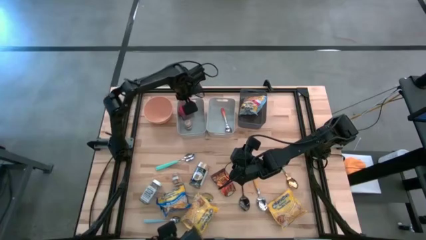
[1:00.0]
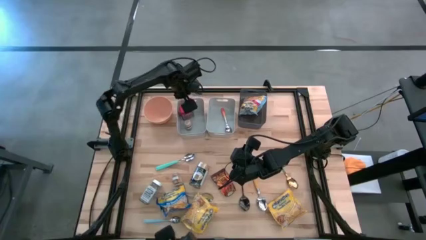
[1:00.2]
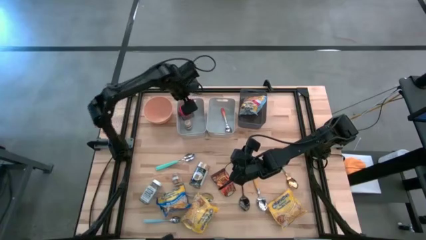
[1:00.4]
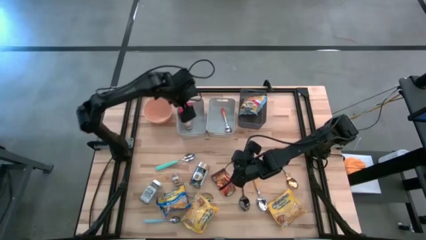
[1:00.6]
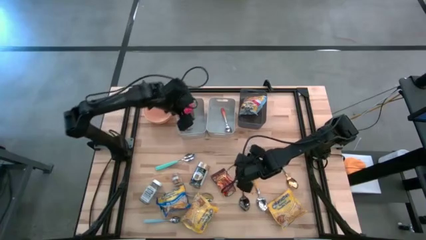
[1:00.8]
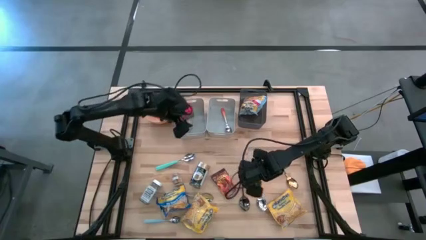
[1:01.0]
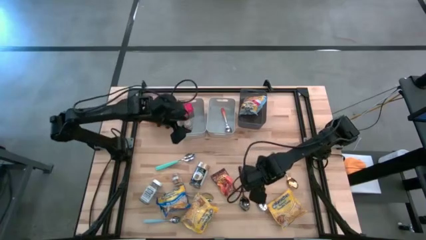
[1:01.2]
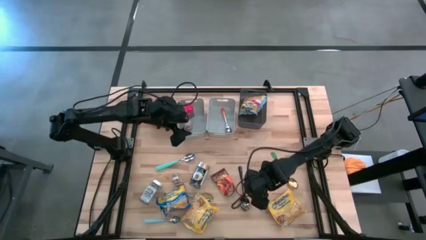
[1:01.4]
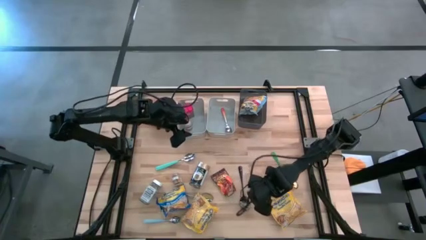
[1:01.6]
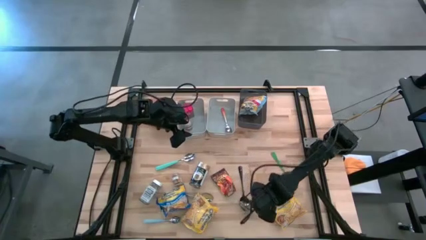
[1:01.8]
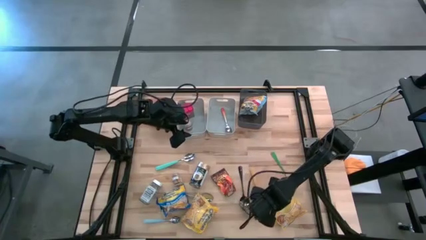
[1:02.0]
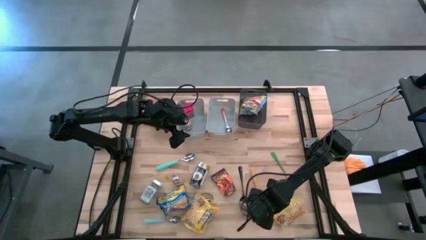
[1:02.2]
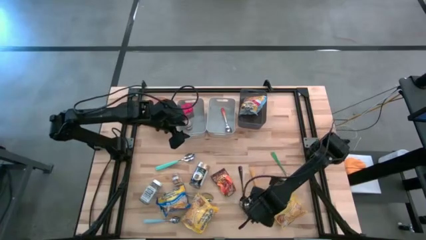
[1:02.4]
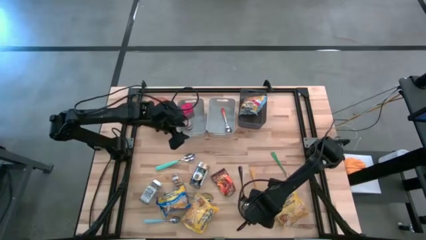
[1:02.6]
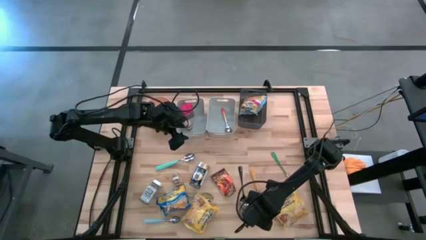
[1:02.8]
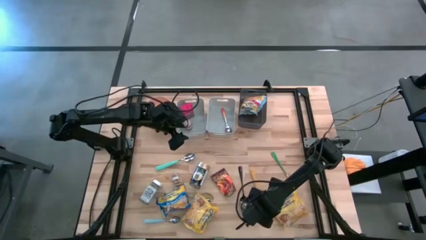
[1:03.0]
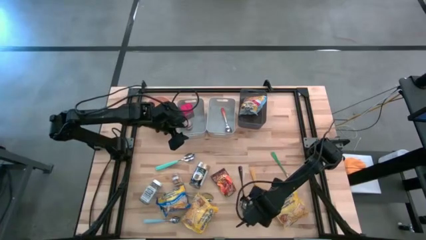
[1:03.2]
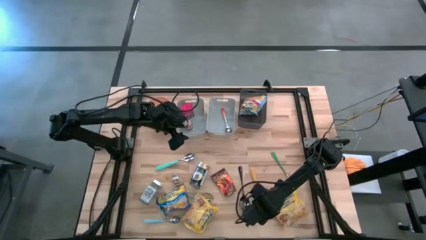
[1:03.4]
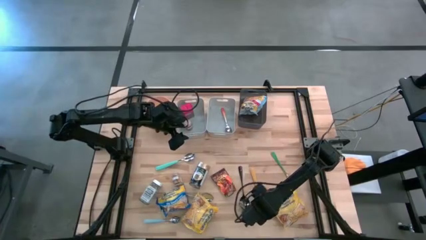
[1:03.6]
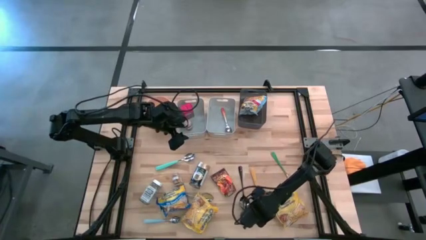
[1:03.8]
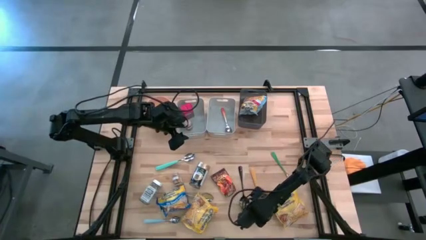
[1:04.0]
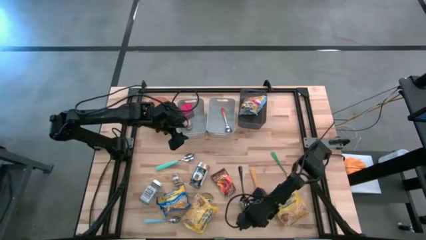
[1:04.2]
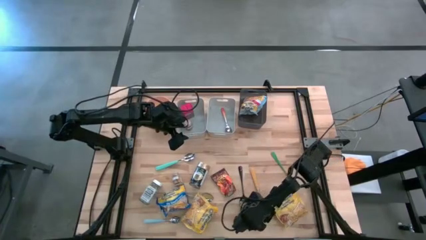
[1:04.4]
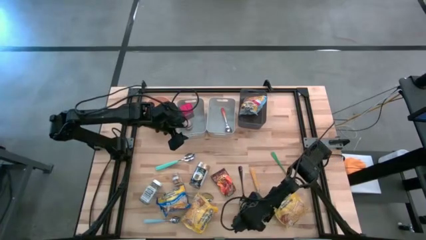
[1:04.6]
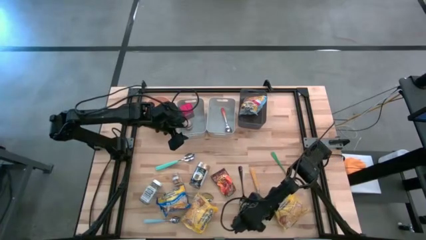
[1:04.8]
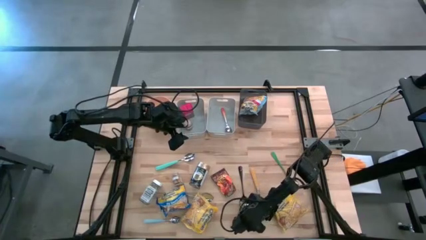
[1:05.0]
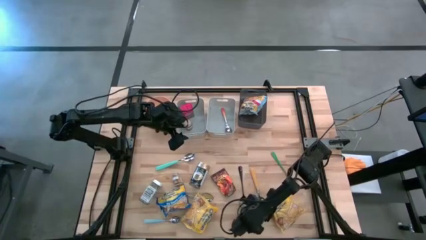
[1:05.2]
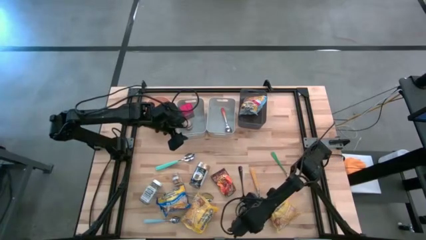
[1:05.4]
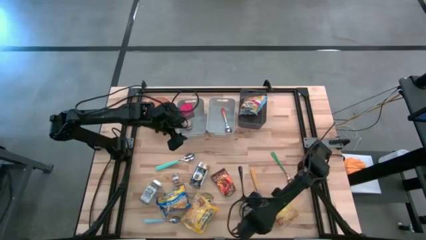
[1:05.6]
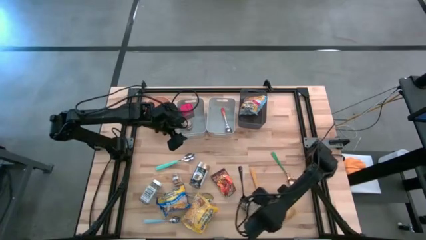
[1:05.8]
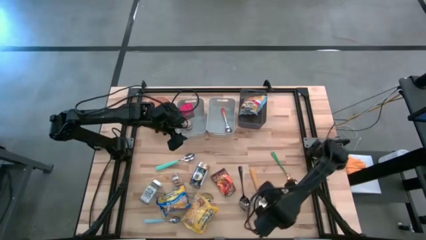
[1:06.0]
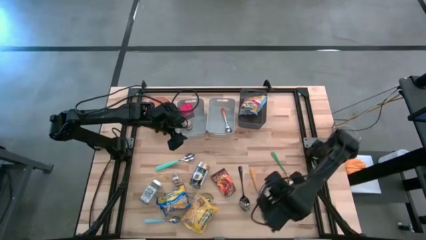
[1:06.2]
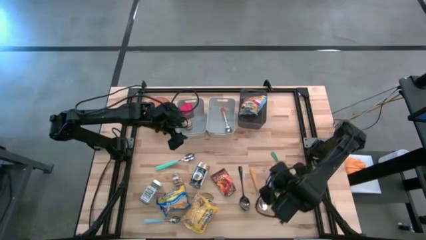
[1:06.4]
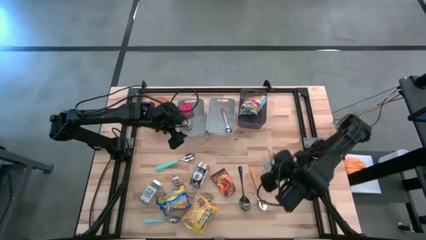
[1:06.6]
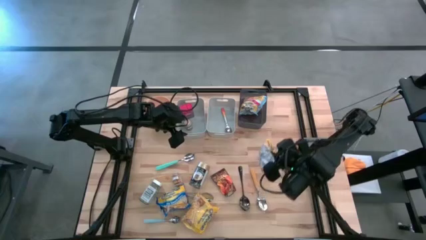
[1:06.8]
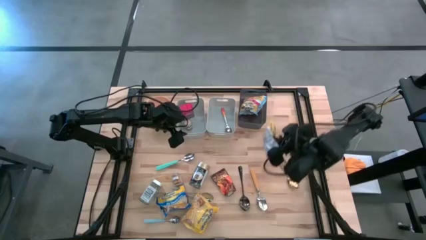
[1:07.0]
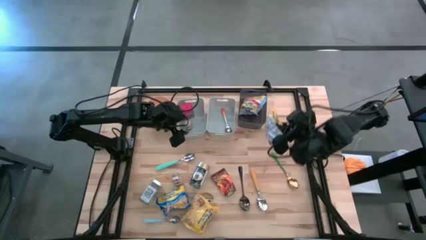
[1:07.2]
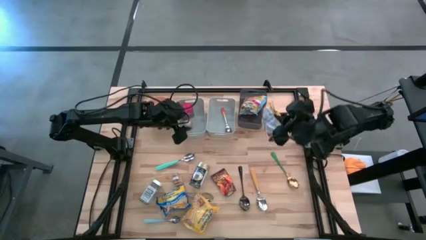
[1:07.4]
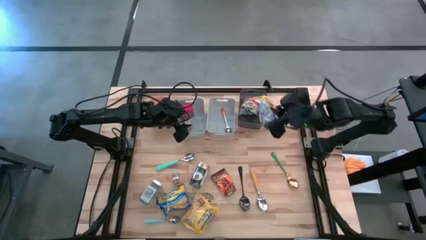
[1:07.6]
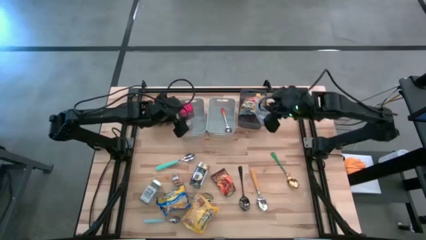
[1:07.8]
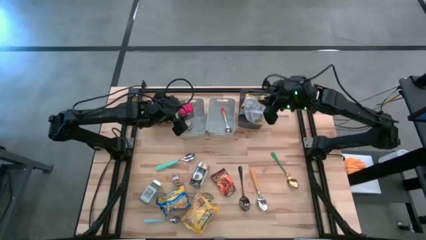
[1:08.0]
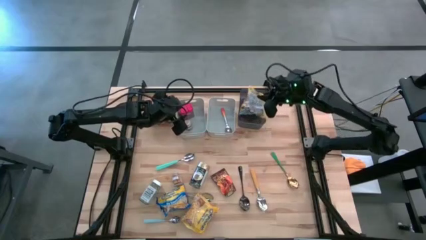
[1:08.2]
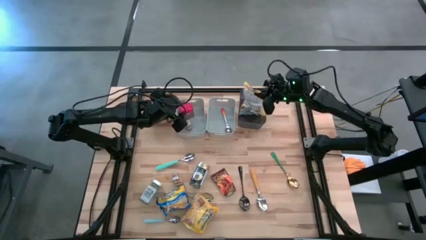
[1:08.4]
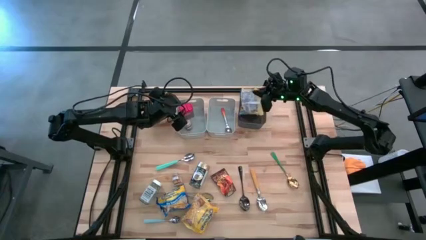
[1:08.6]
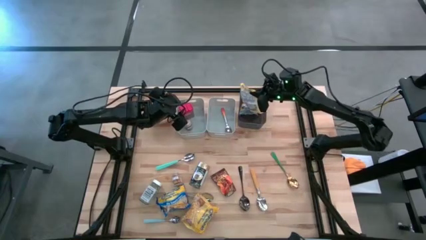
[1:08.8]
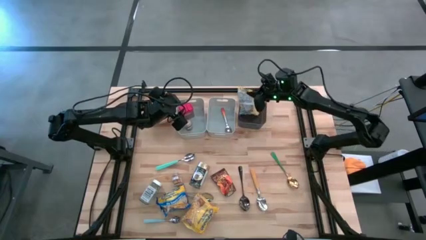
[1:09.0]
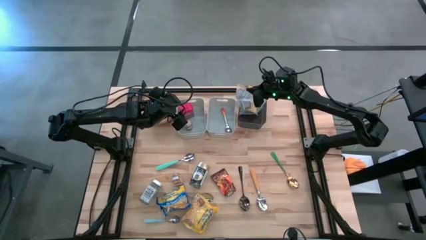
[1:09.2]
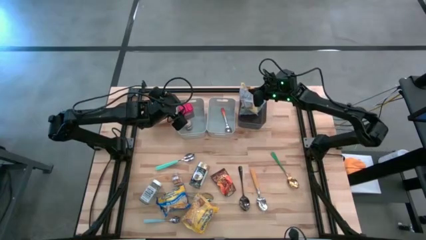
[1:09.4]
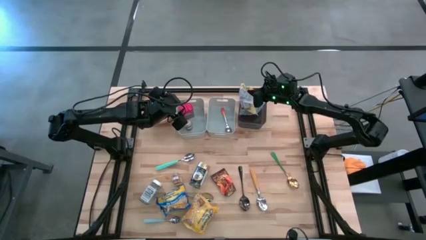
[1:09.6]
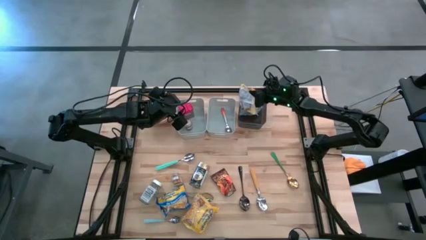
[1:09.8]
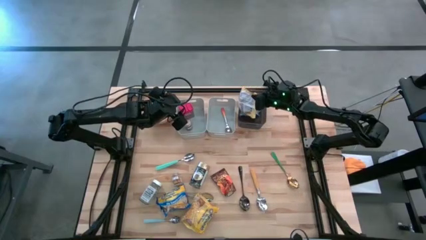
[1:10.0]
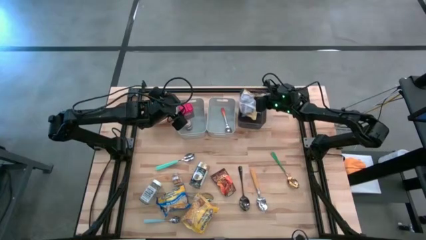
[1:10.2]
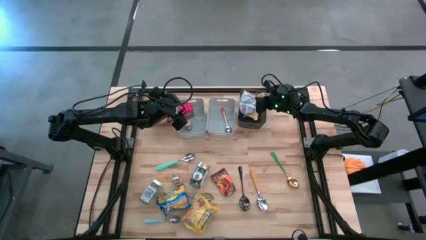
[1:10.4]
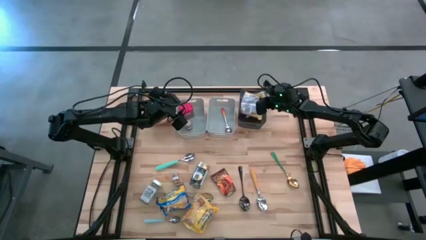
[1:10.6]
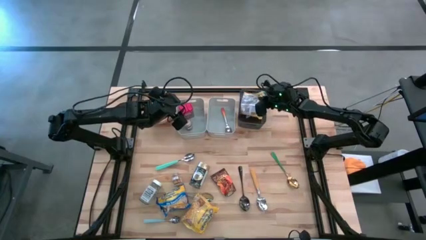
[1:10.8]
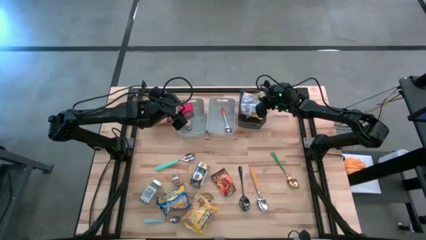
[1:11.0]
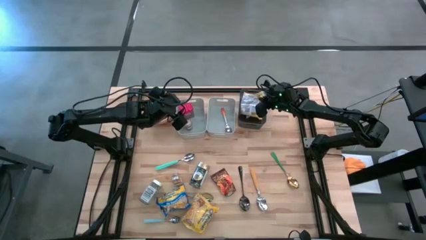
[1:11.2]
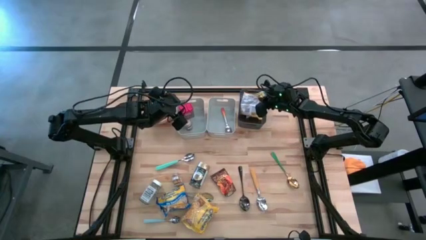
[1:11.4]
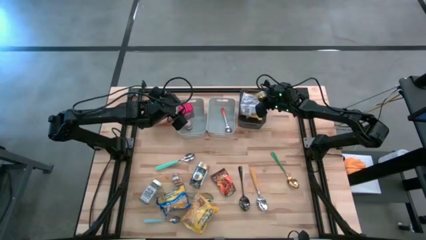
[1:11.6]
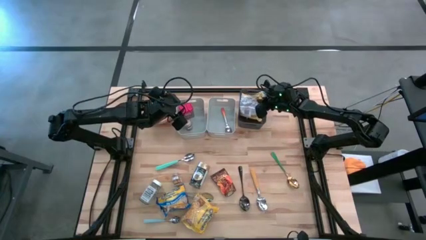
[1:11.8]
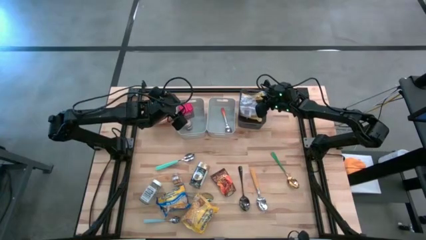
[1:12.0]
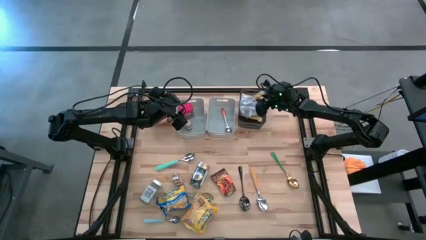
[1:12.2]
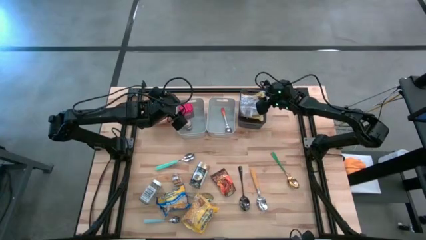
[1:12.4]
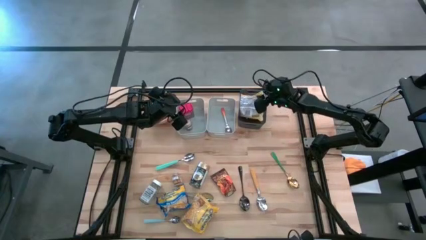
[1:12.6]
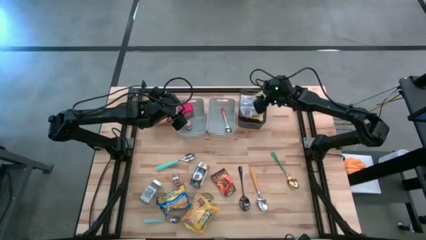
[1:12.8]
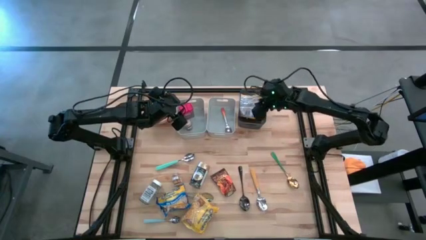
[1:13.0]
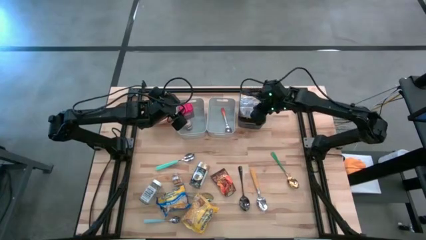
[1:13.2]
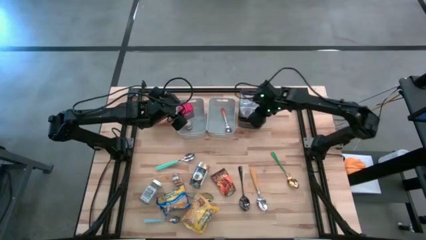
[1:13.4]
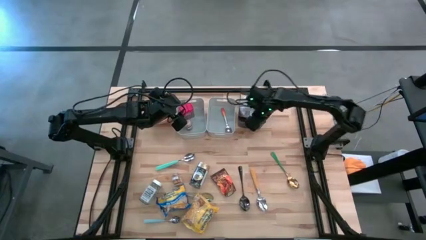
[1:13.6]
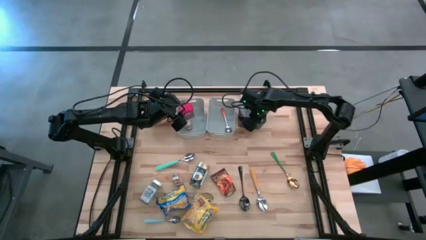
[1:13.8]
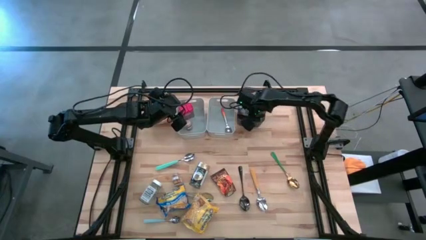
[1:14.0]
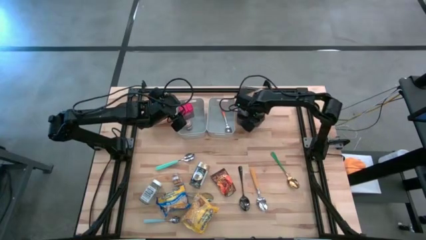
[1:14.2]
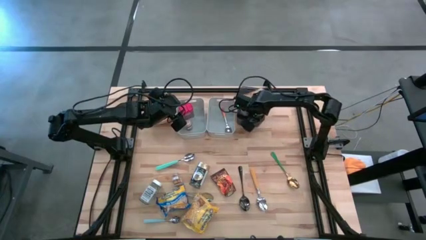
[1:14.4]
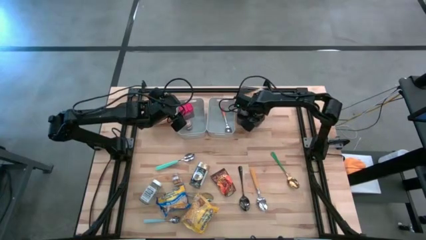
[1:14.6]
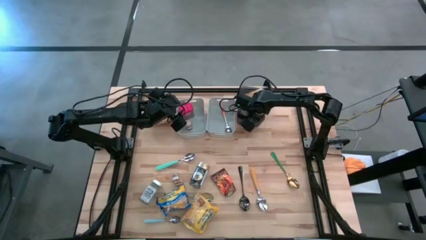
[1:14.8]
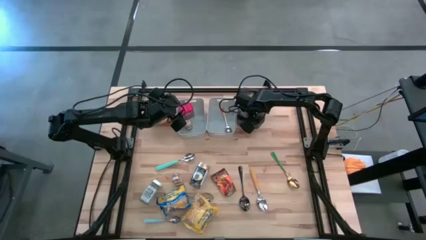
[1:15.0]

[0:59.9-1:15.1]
Put the right yellow noodle pack into the black bin
